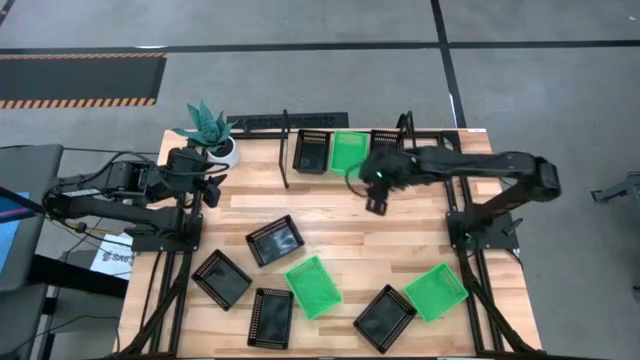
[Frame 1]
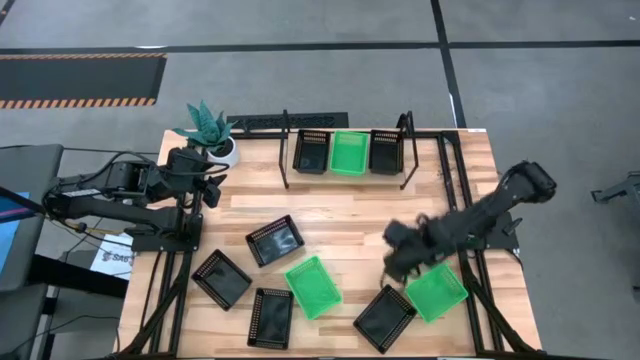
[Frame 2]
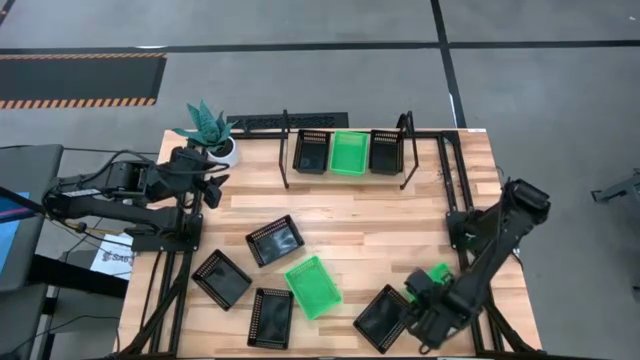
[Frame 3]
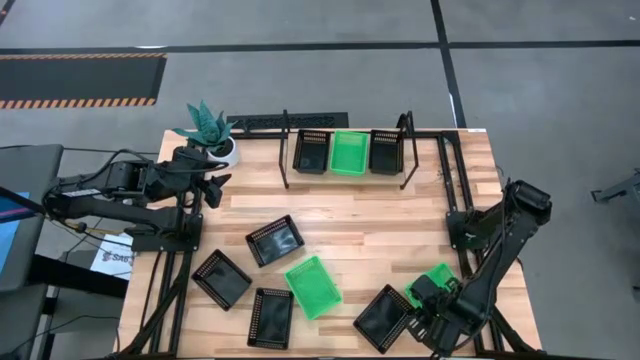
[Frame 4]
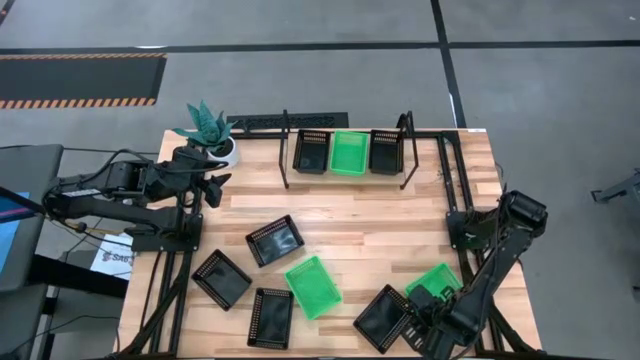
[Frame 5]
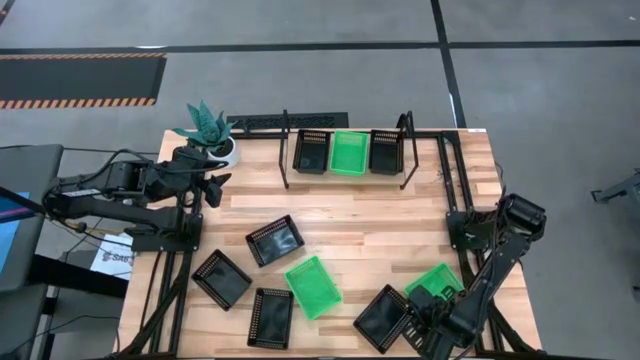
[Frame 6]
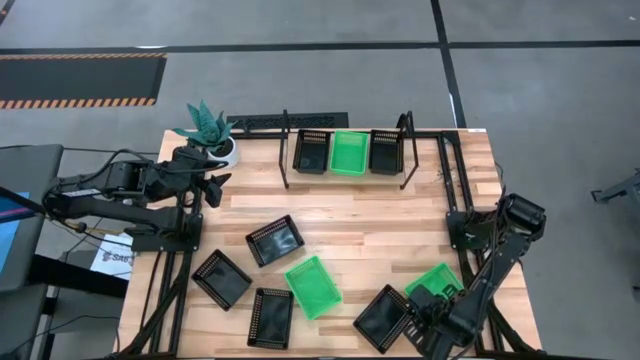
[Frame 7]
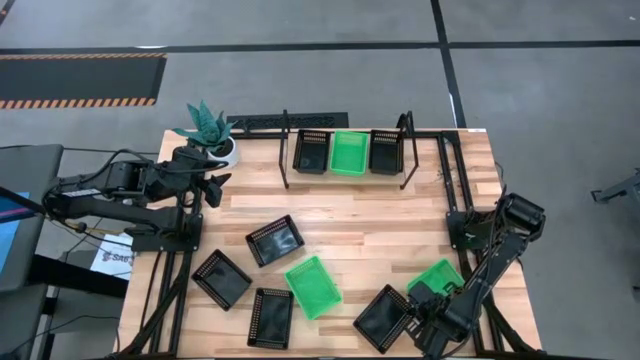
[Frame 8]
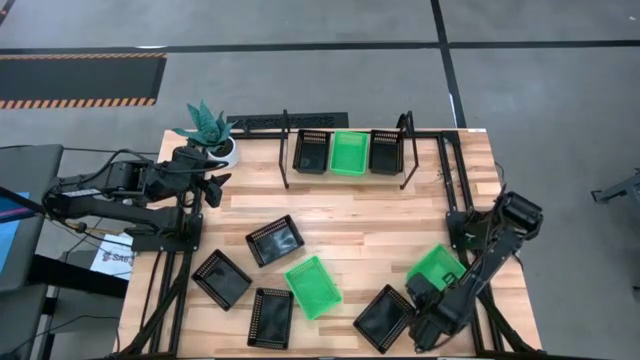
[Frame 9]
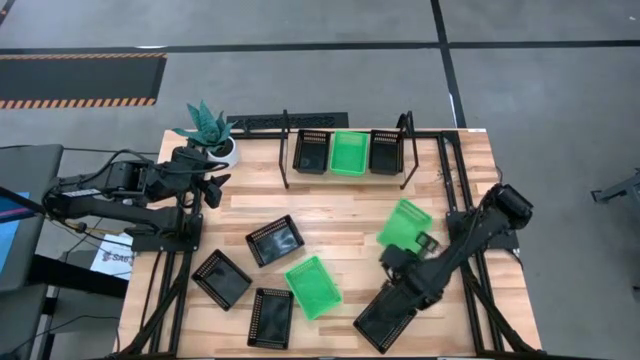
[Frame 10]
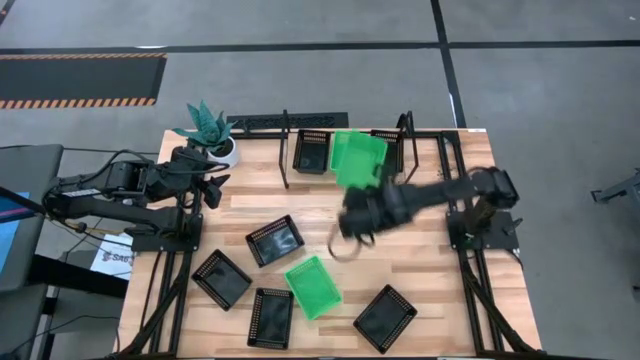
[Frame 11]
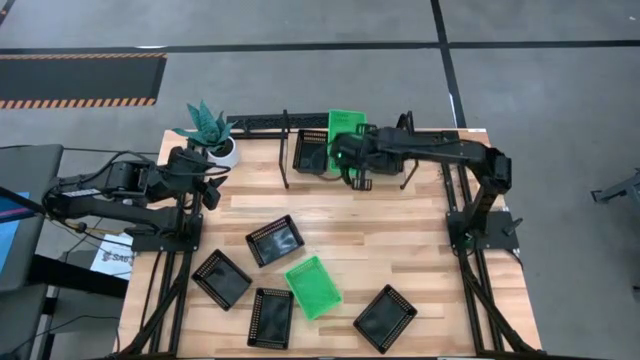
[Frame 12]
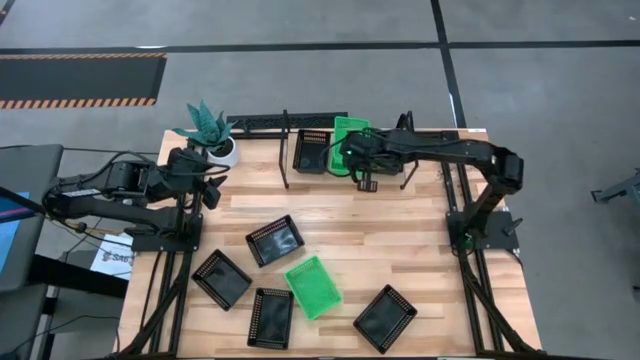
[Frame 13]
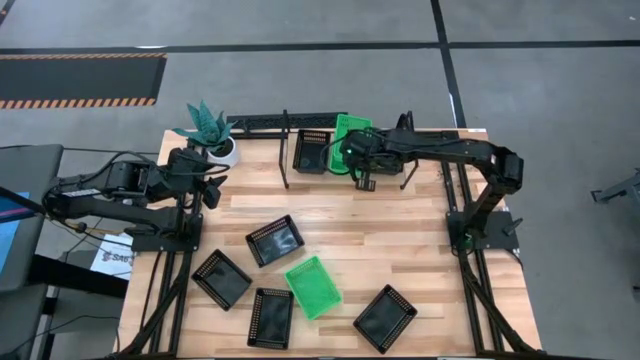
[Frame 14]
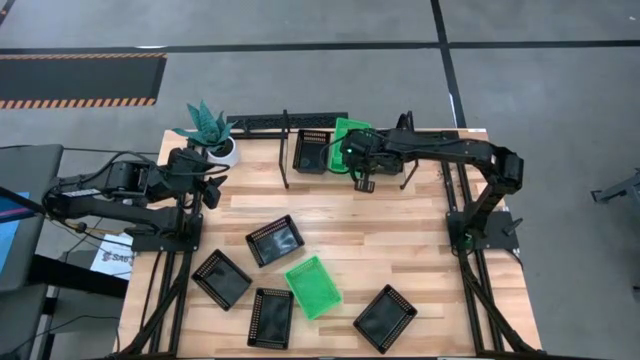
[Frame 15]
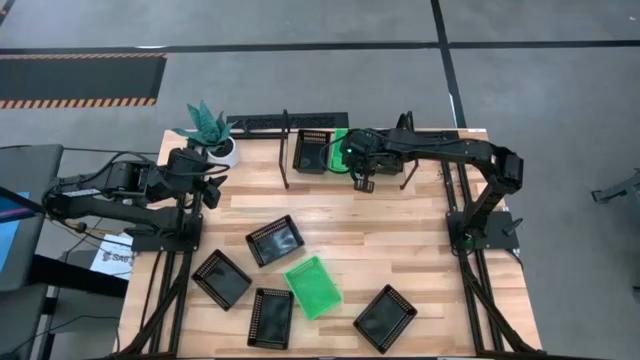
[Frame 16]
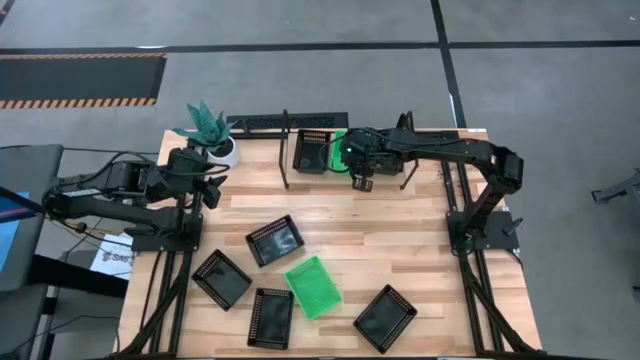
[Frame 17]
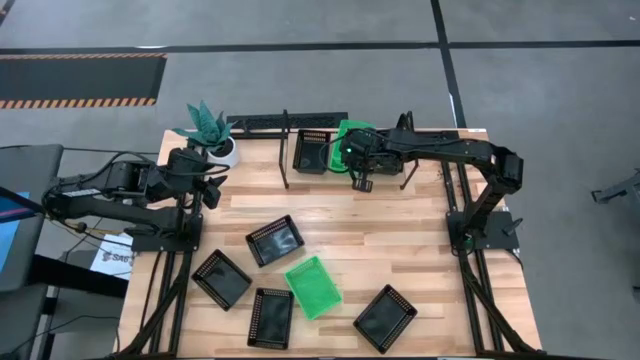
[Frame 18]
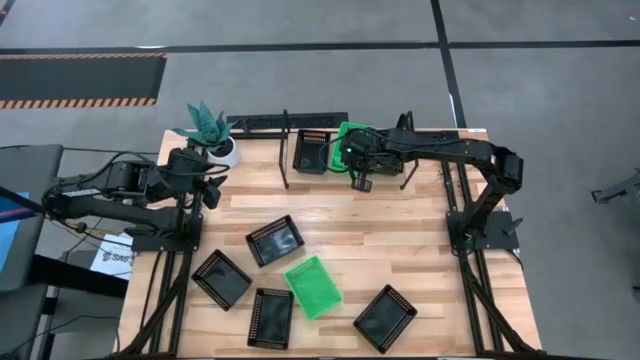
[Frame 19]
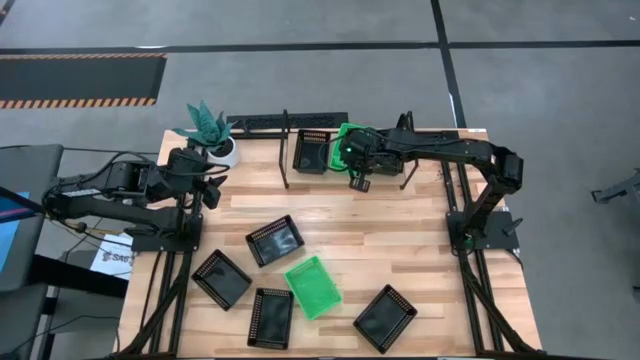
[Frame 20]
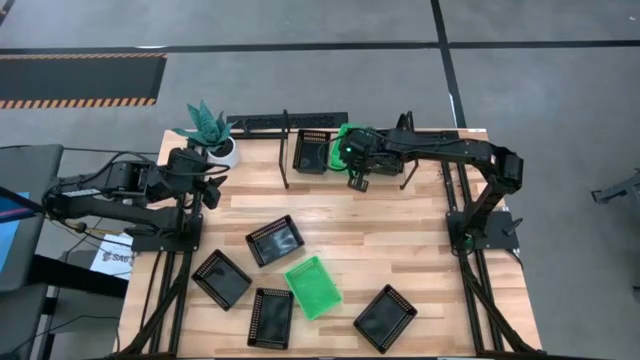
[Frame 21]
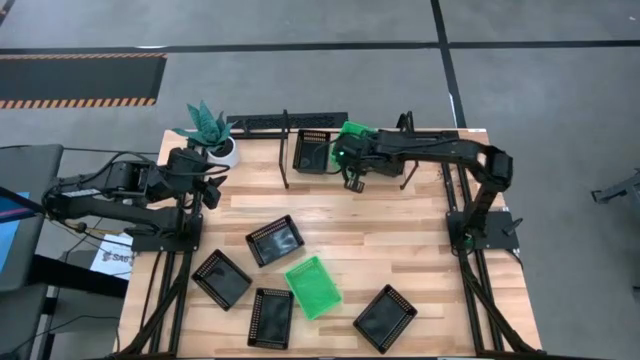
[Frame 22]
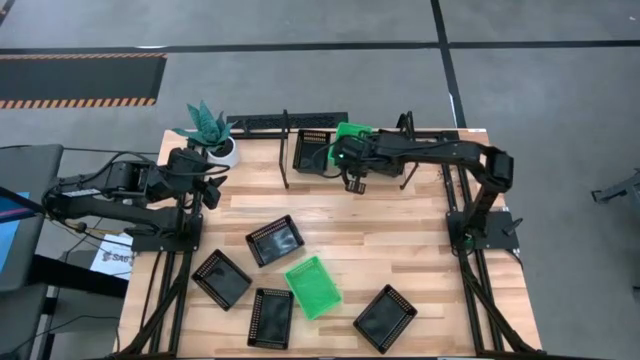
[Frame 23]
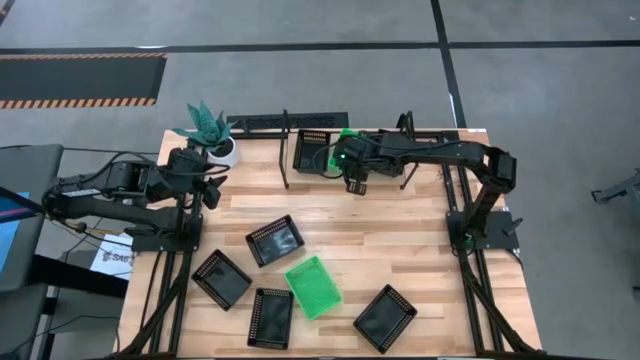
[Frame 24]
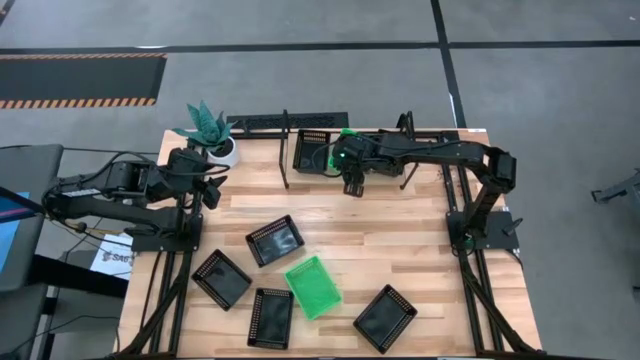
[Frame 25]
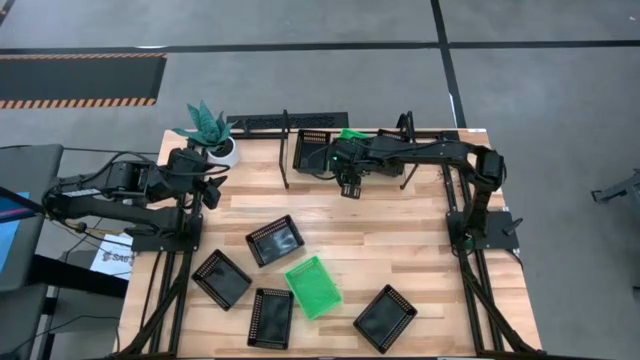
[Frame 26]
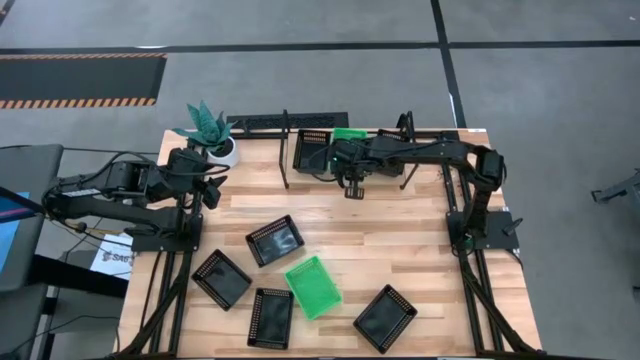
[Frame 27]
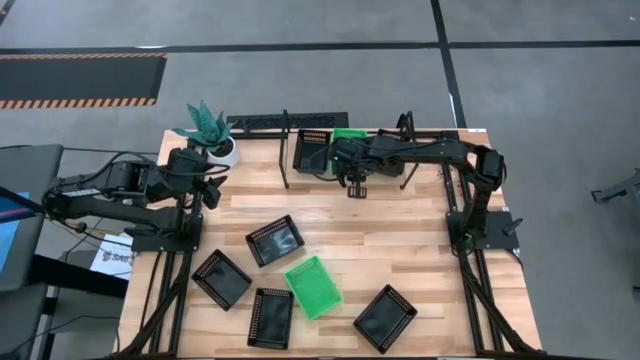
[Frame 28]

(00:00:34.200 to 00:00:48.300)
Task: Stack baskets on shelf by color
Stack the green basket on top of the green basket on the shelf

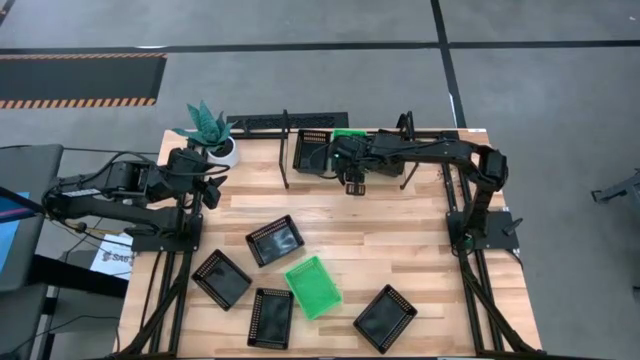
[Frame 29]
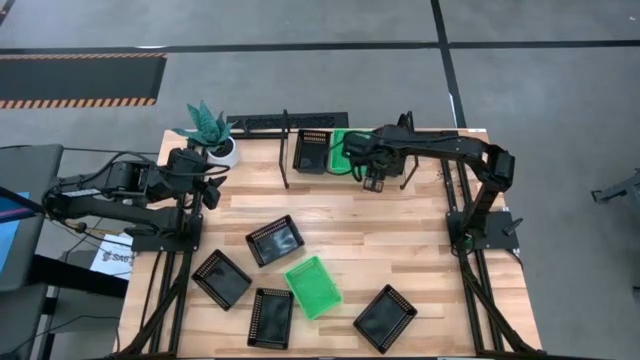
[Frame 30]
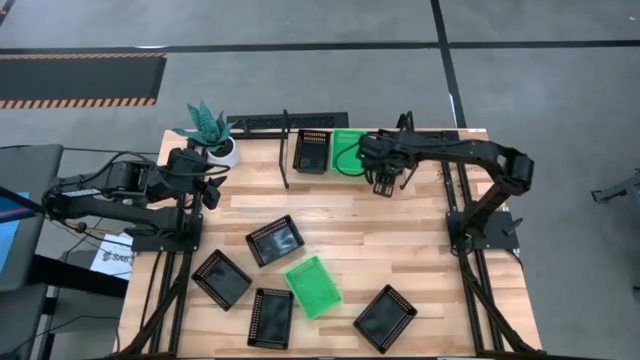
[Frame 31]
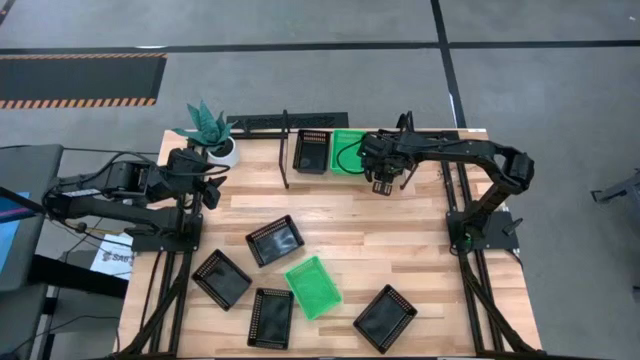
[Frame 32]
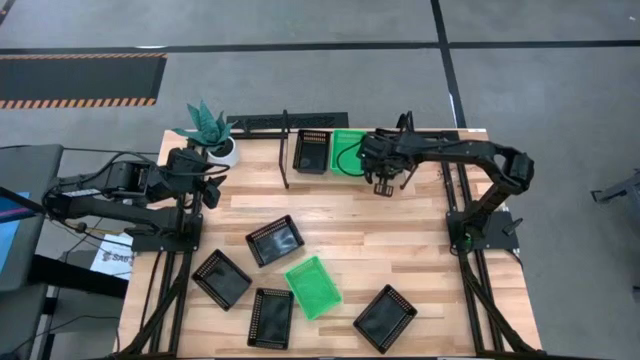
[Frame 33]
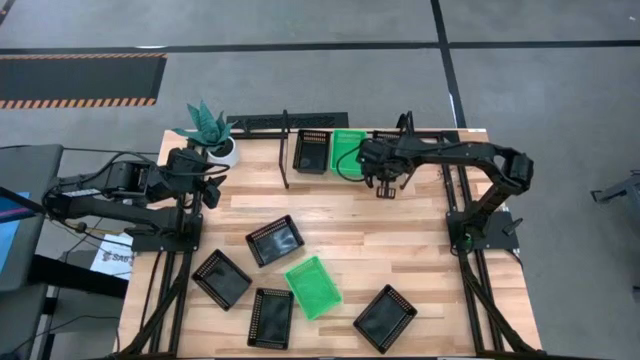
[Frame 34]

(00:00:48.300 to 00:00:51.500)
Adjust the black bin on the shelf

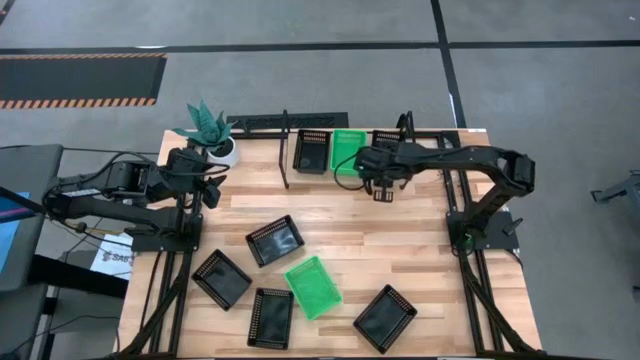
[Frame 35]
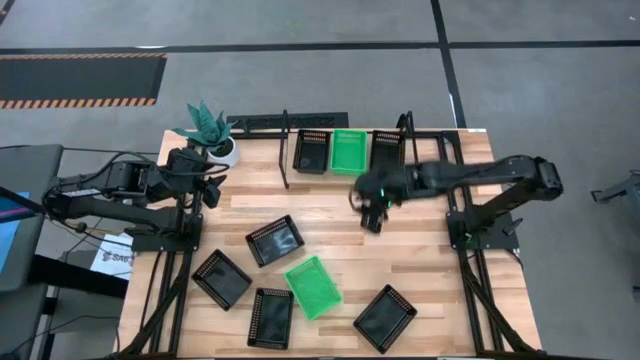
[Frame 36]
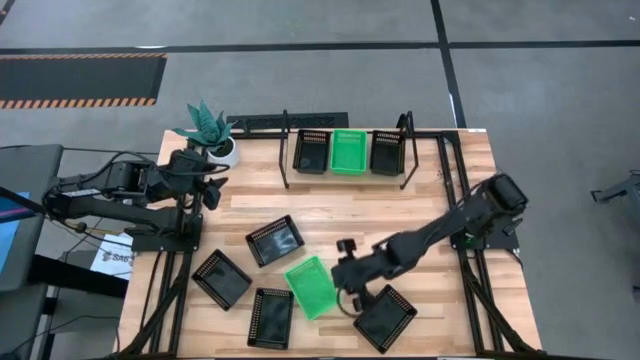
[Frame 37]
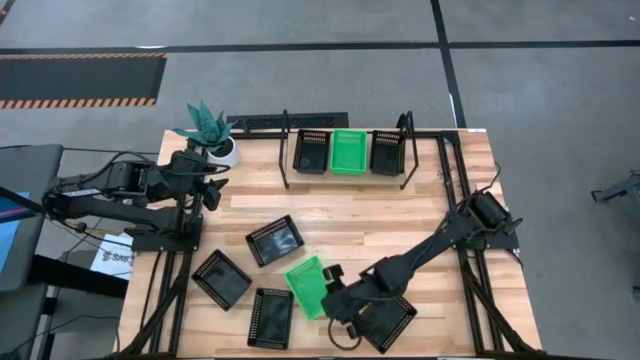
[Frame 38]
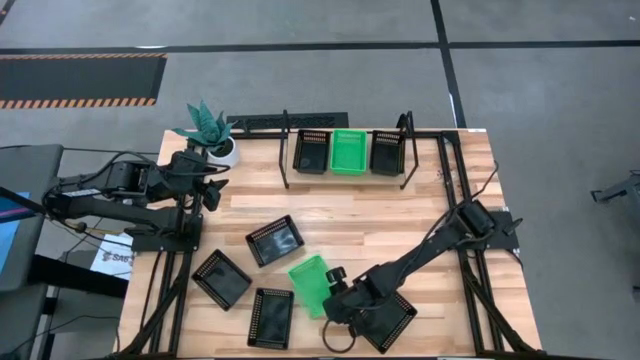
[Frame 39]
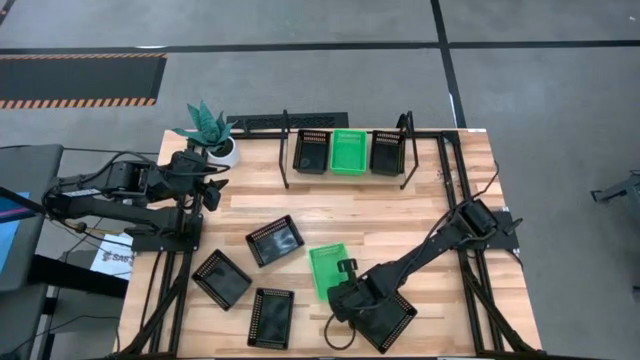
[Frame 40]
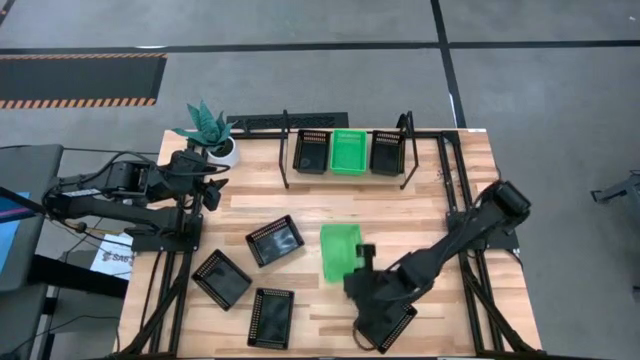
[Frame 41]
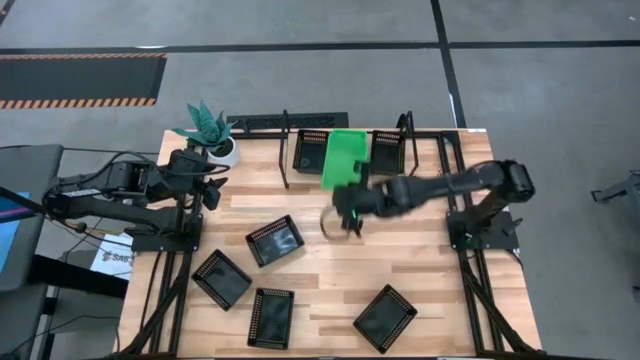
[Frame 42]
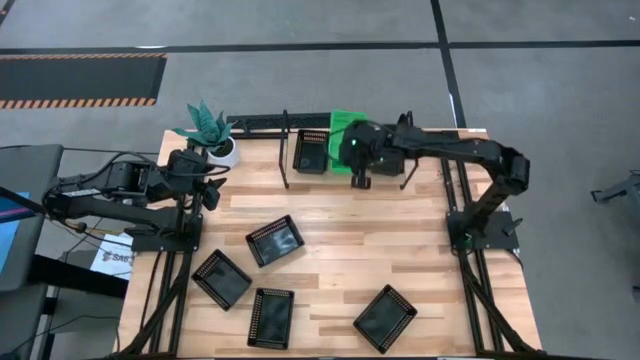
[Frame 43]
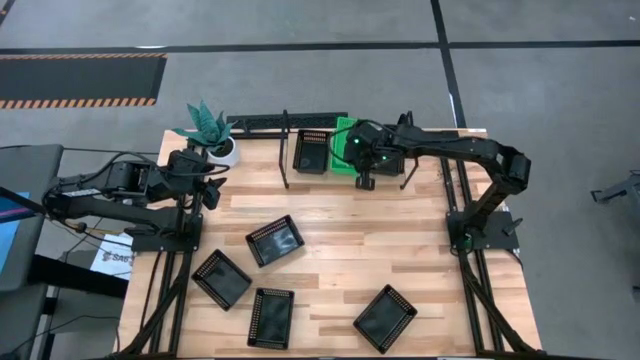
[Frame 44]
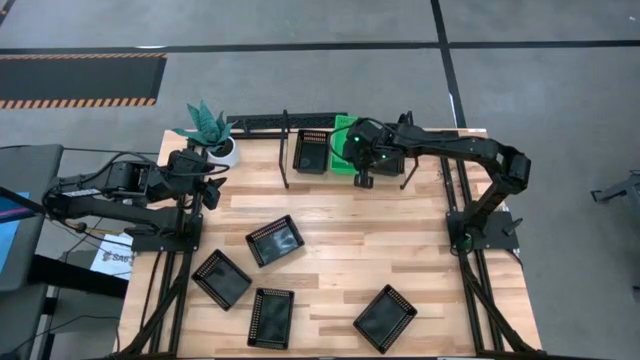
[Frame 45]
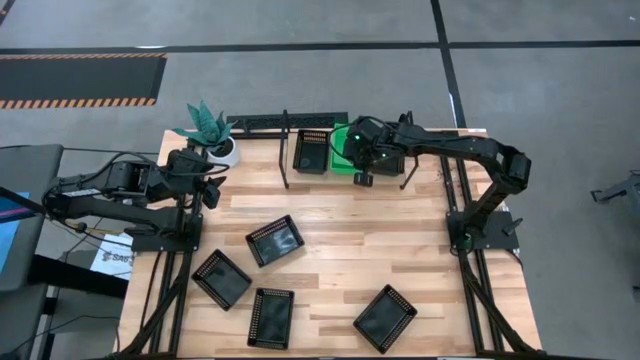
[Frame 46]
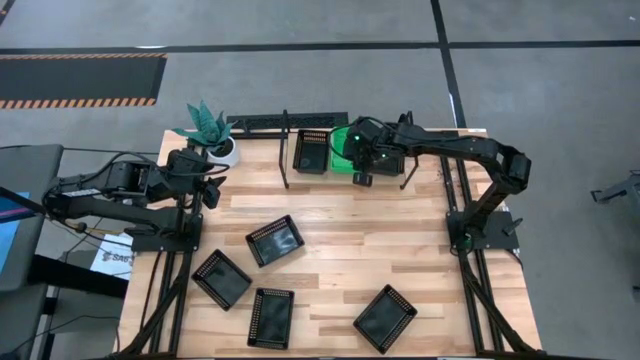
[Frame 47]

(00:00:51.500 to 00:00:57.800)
Stack the green basket on top of the green basket on the shelf
